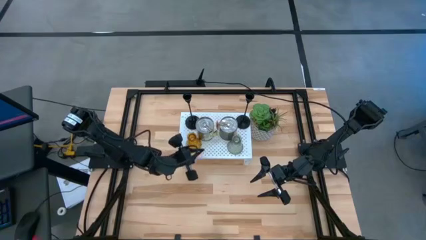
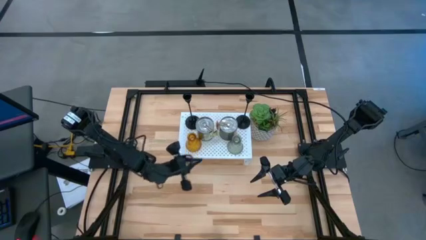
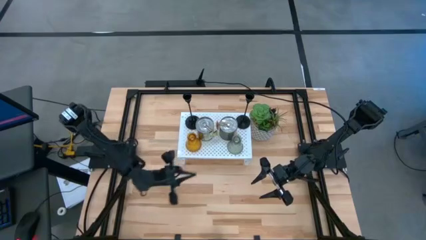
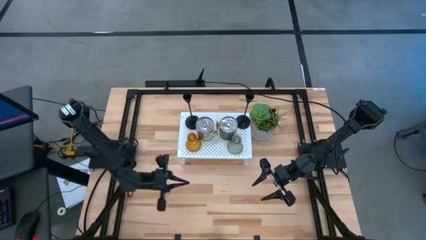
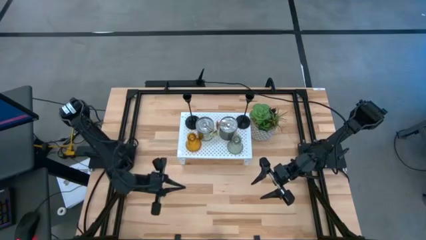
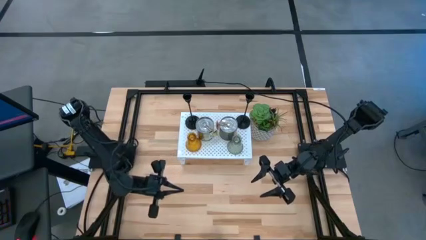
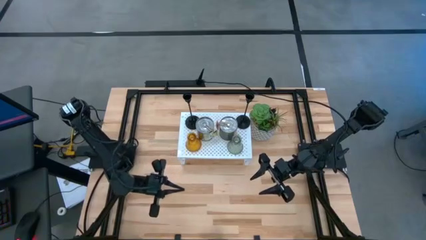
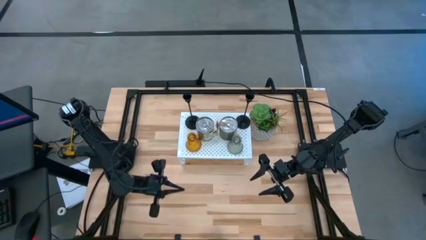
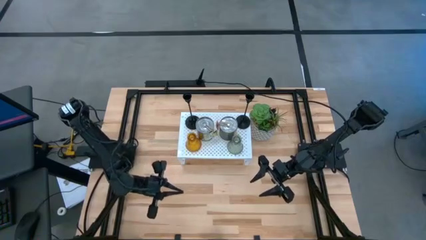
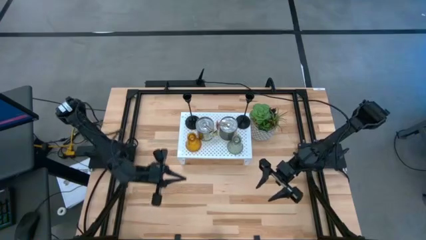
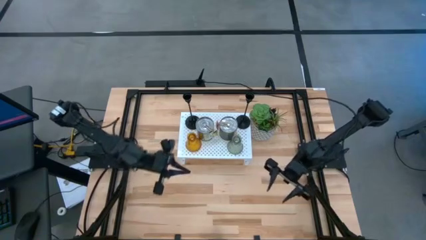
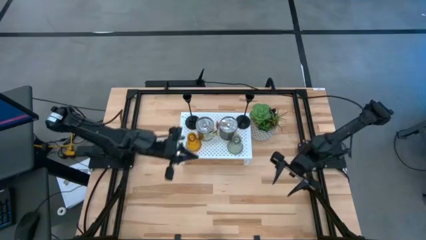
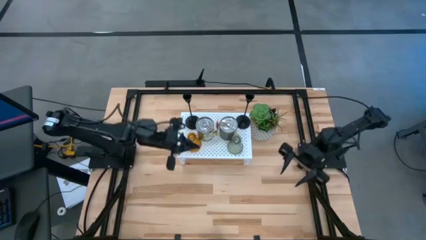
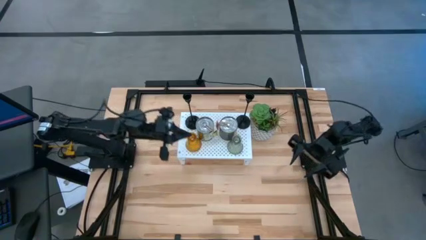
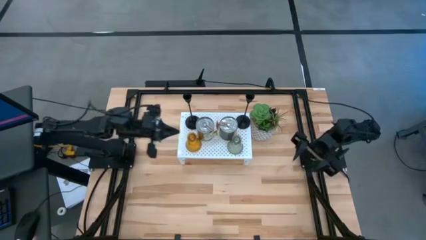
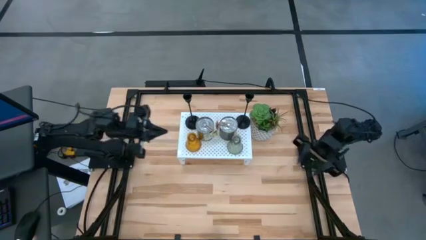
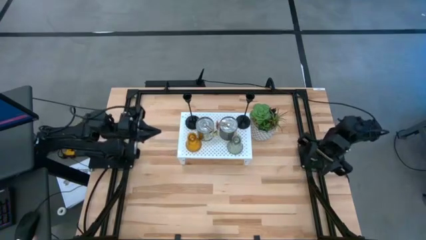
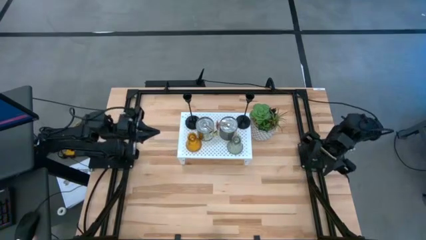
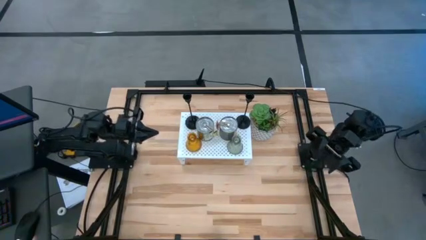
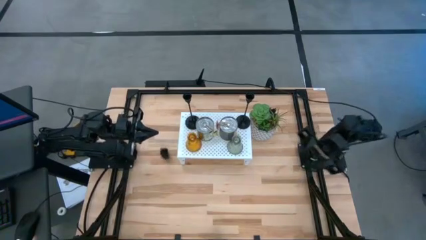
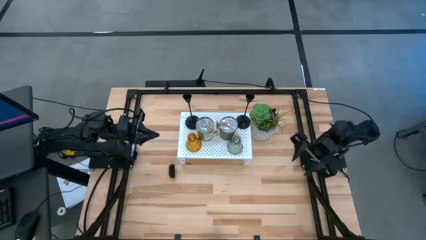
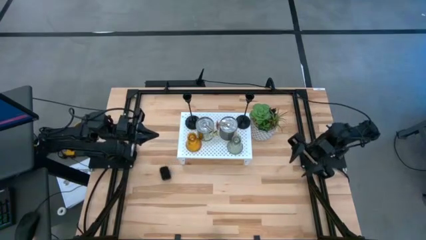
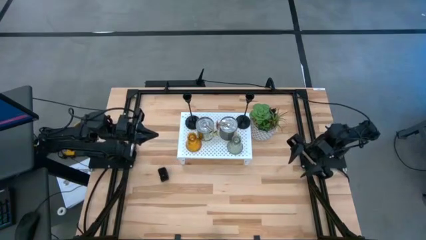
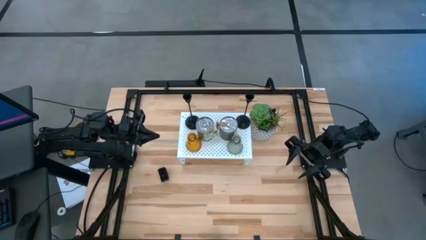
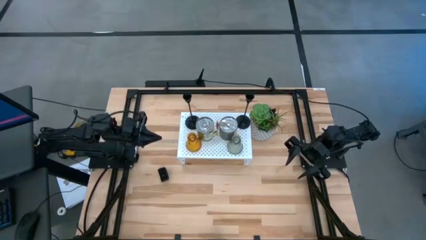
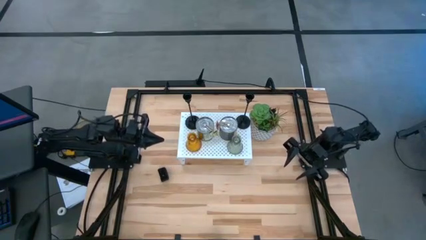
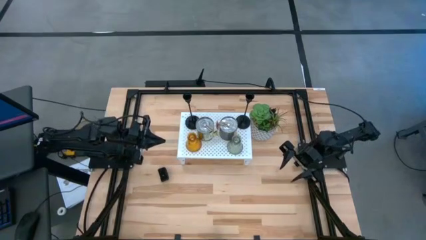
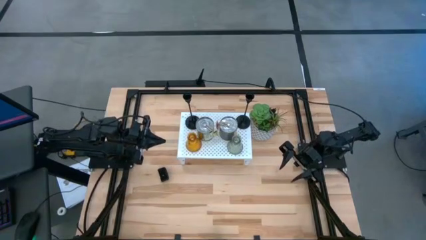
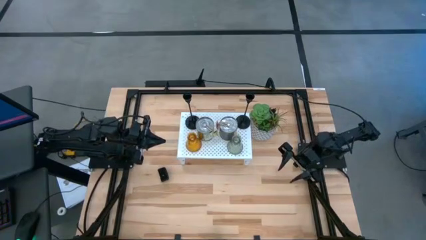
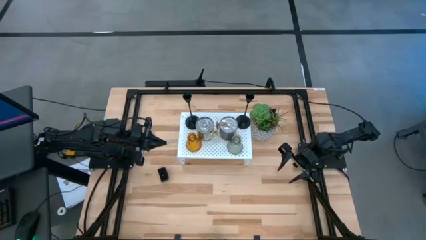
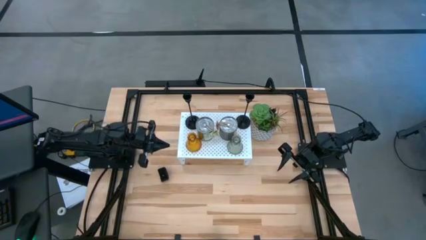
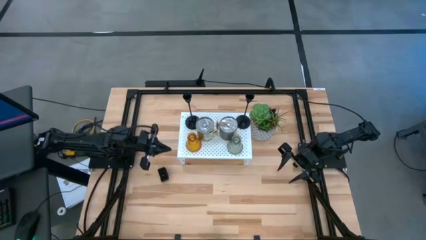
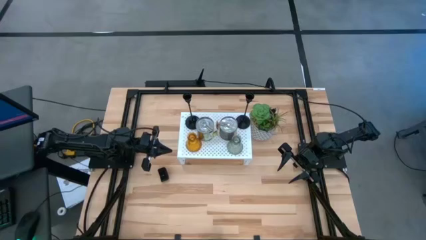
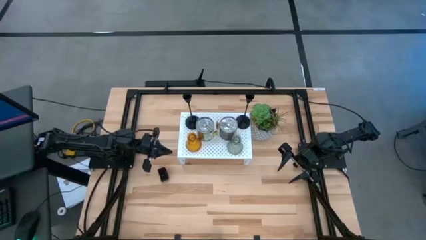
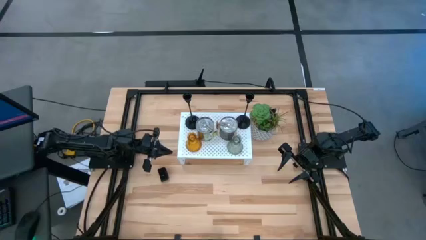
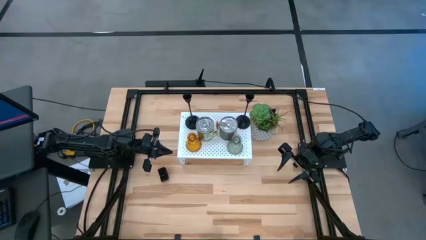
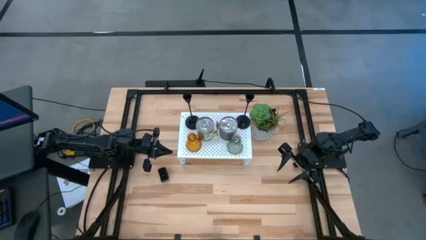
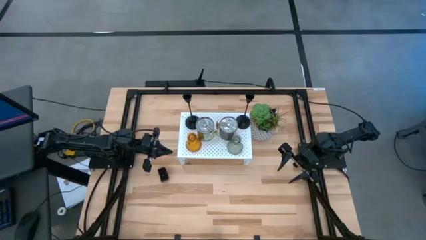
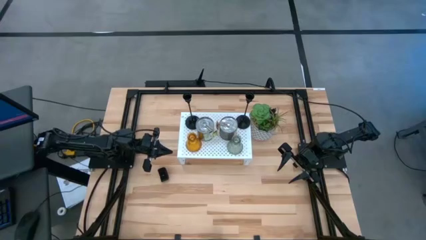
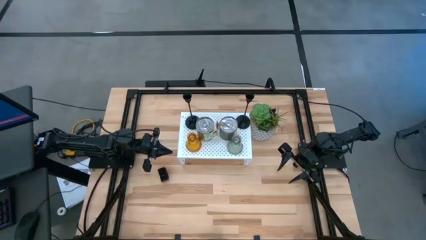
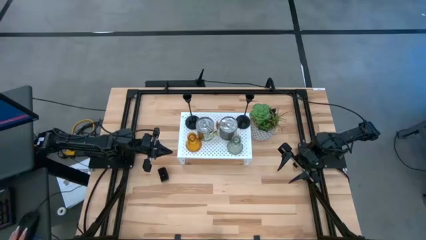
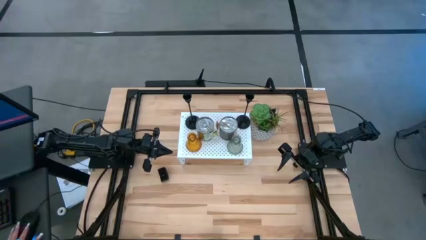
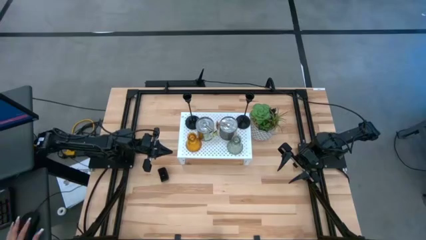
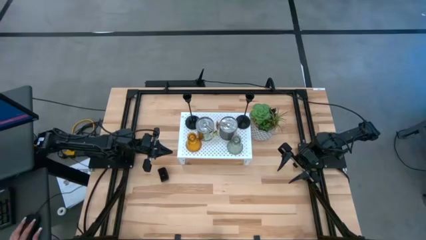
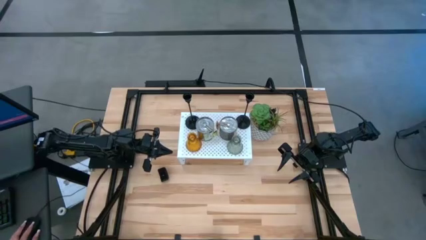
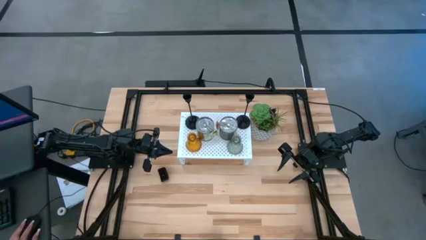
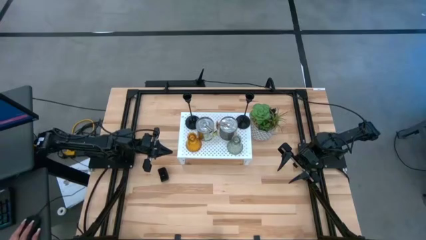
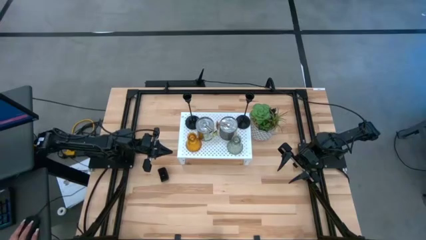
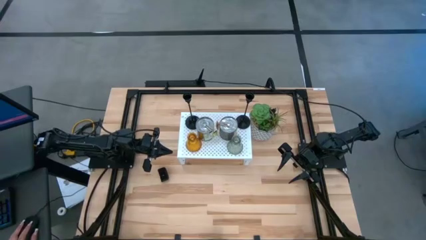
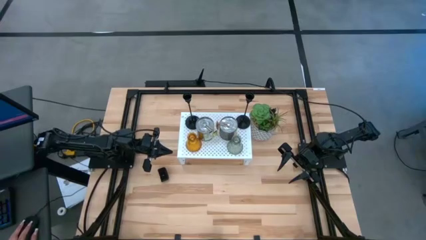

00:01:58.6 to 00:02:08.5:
Task: Pick & Place candle stick holders
Return to Home Position
